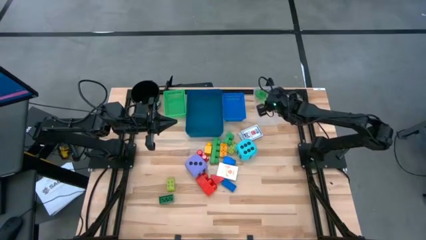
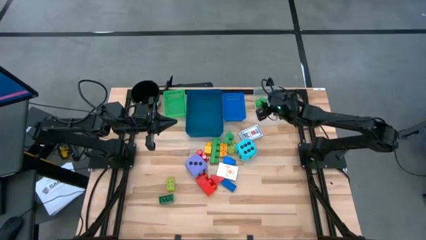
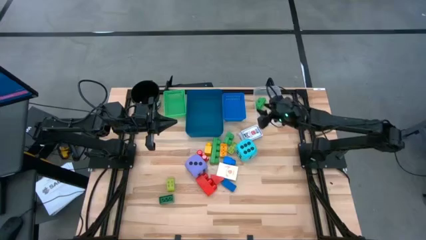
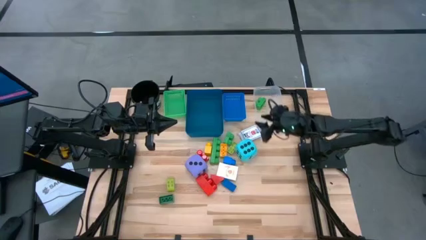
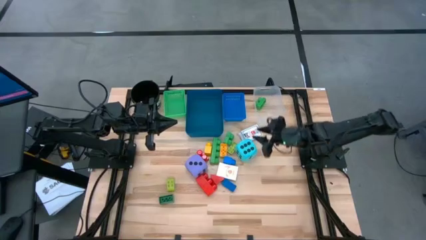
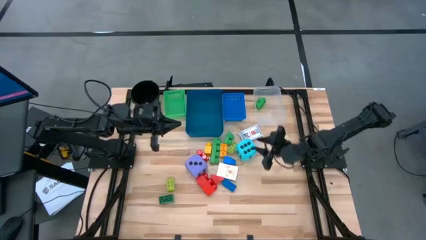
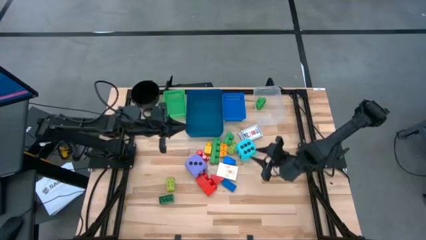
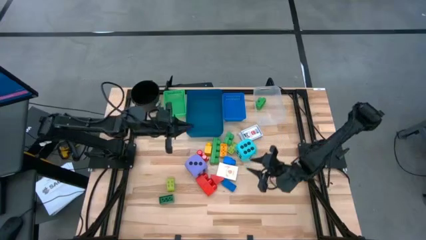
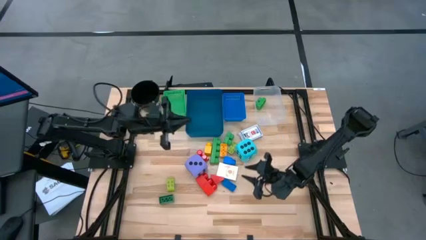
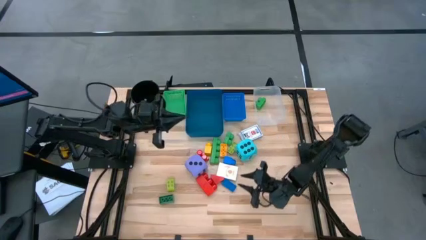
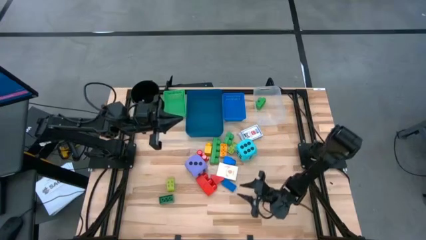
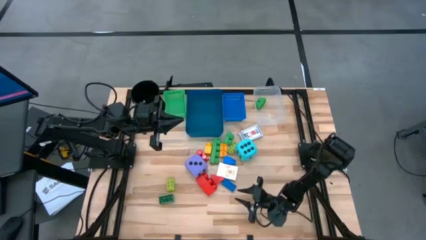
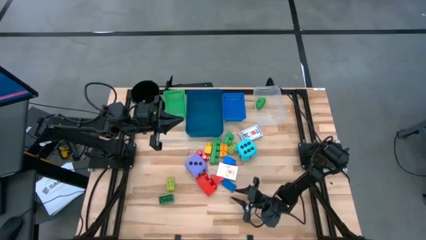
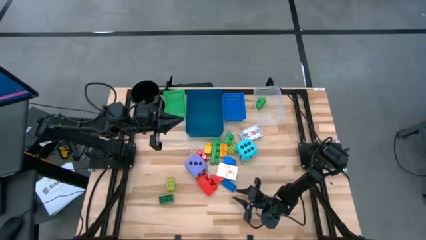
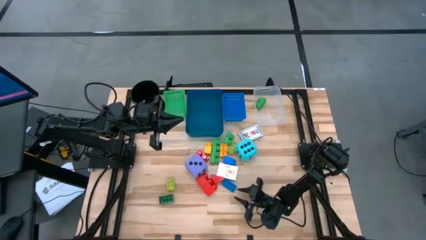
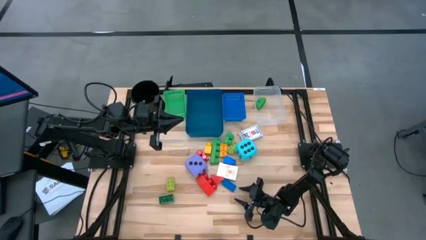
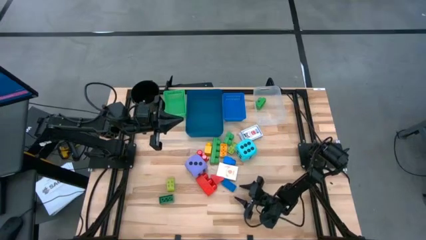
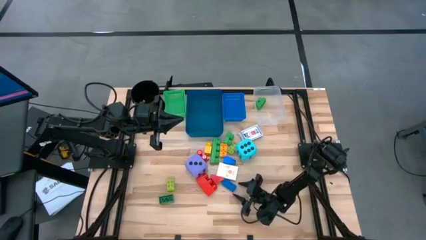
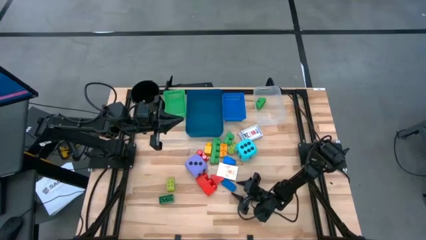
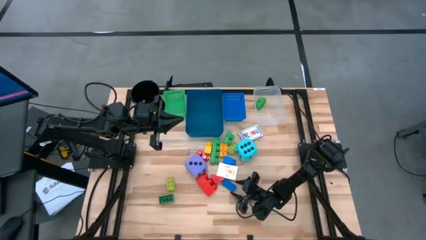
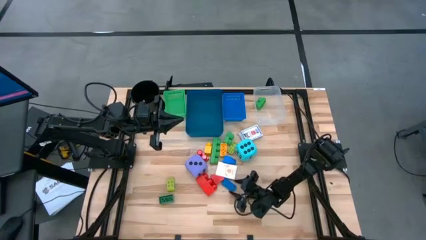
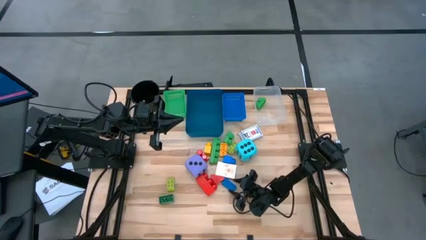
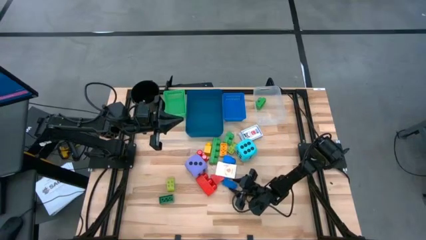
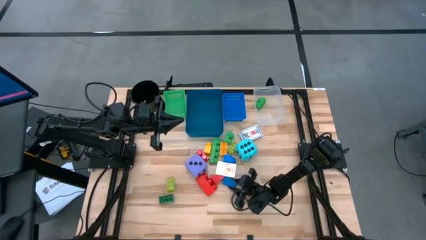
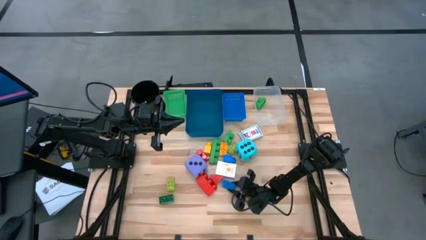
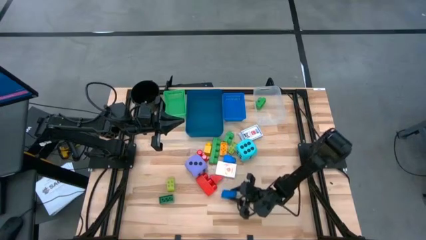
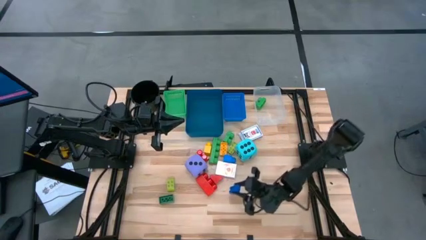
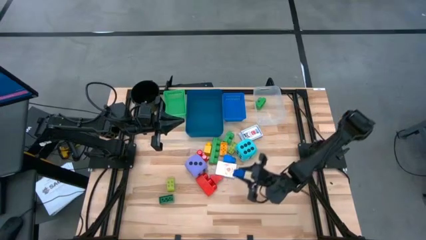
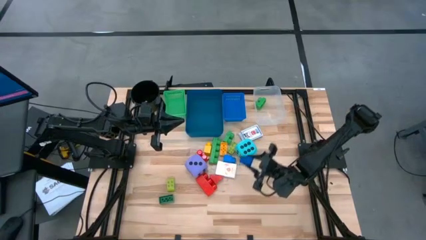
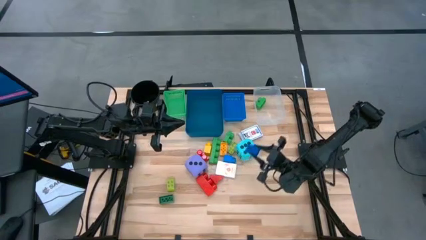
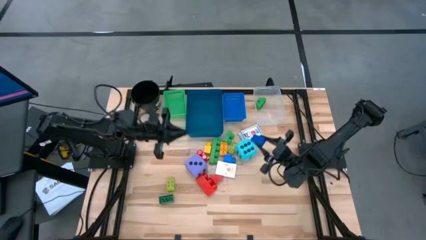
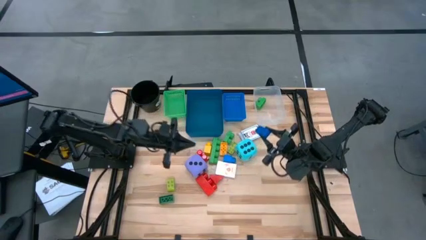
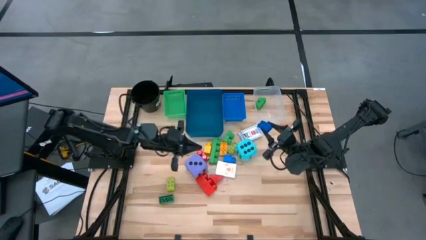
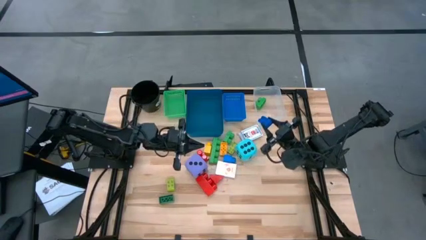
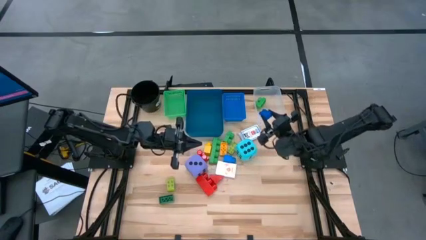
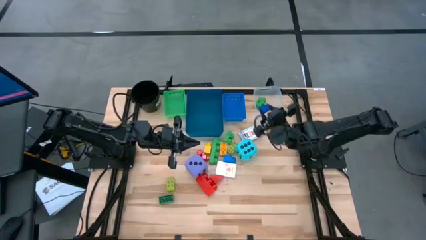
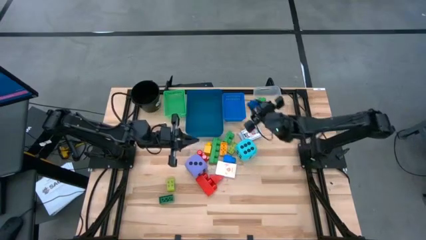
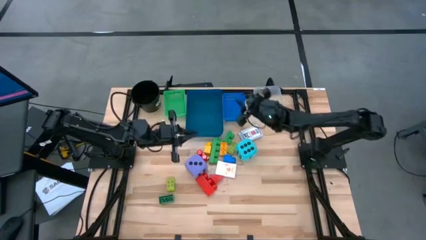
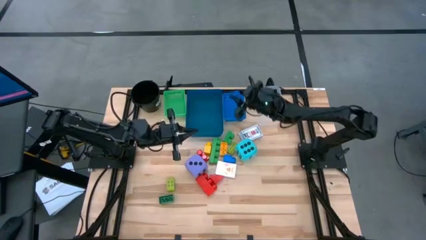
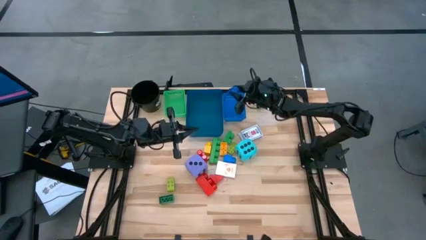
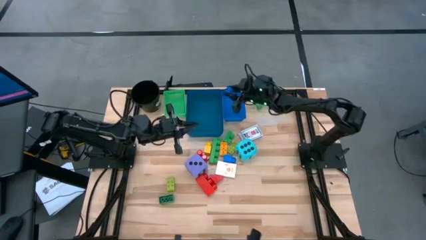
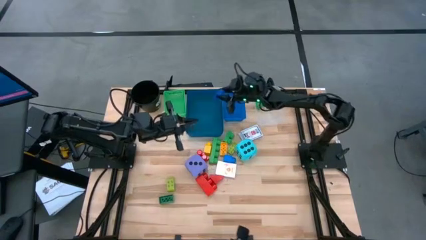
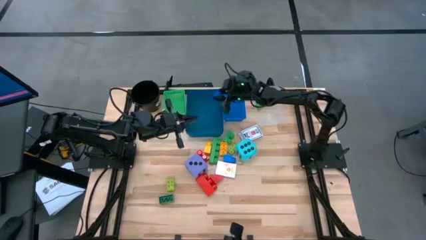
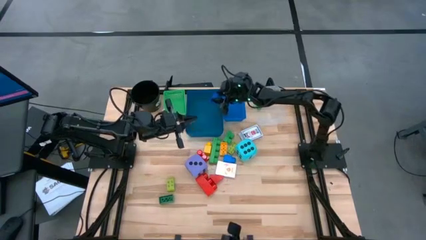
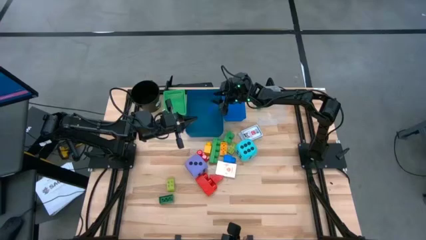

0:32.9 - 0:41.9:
Task: Pick & Place Toys
Put the small blue game piece into the dark blue bin

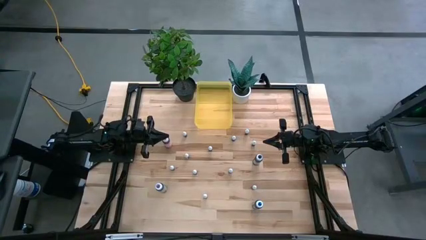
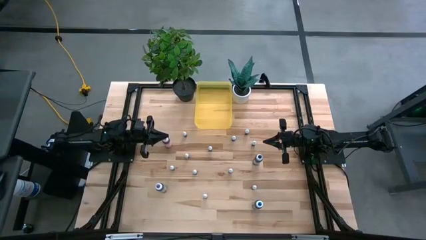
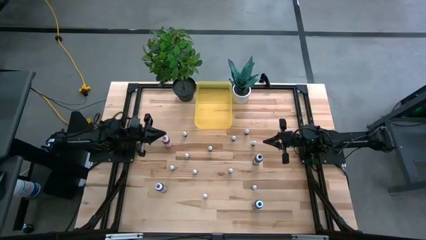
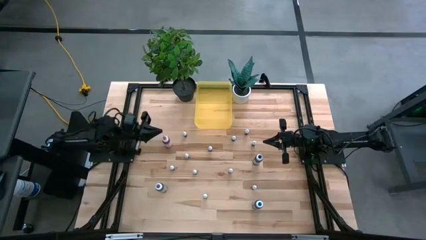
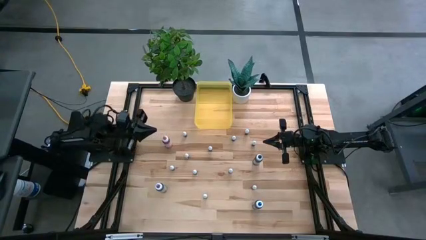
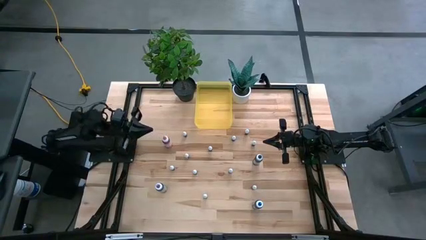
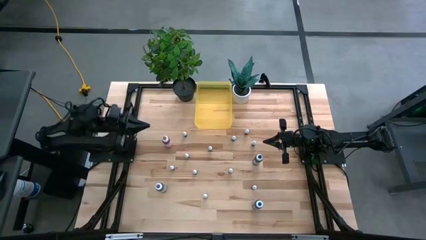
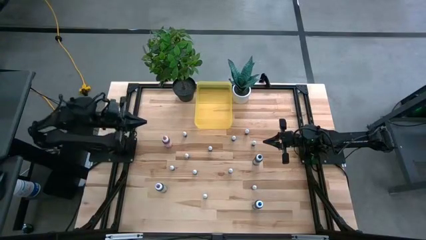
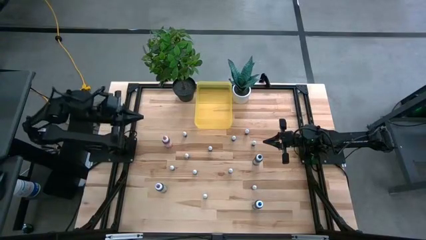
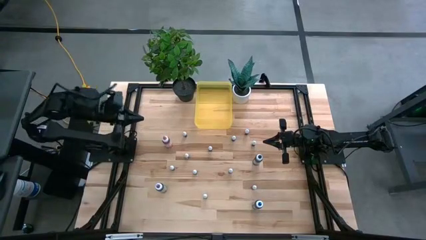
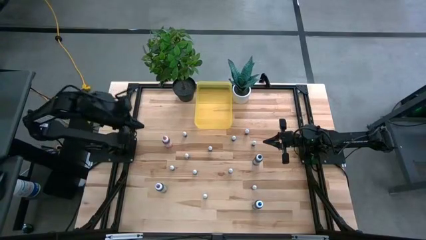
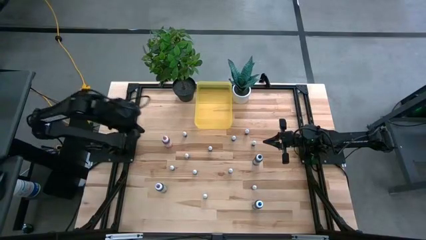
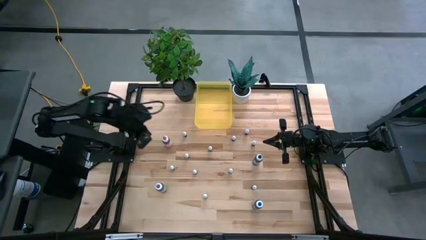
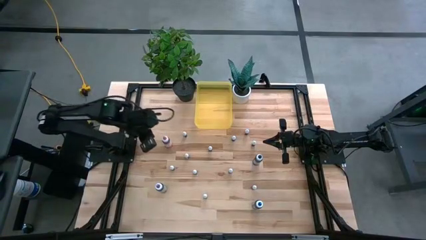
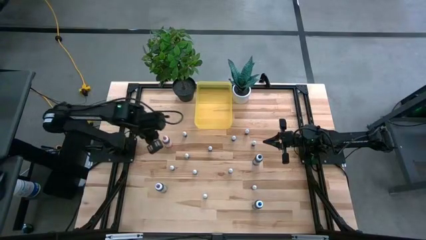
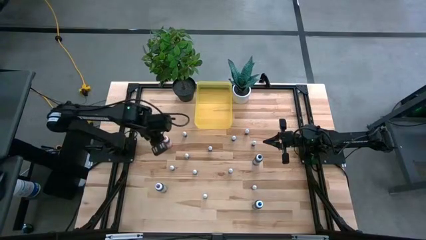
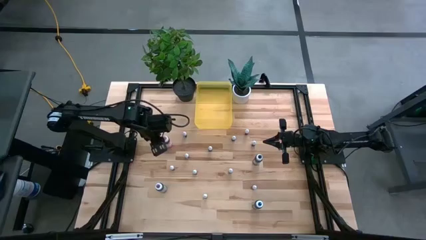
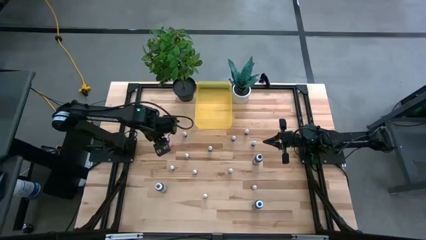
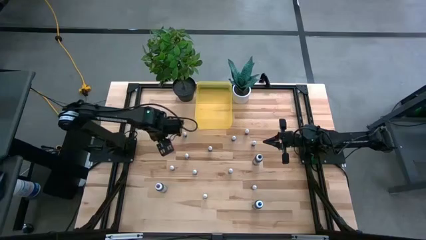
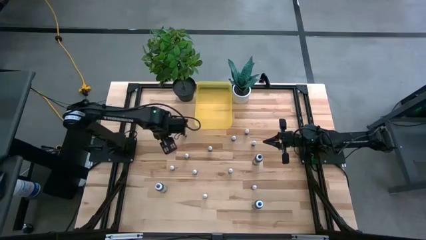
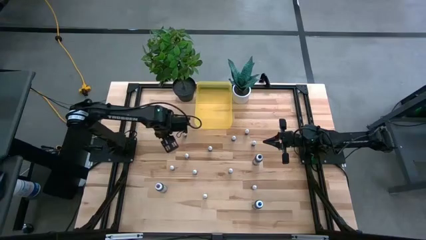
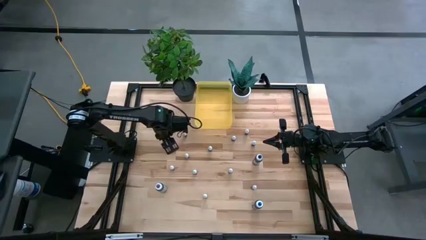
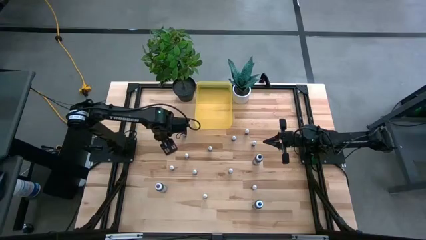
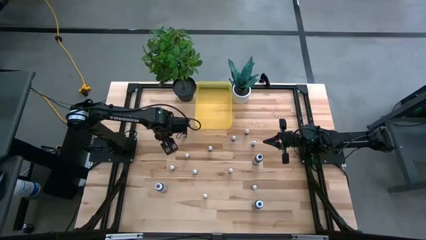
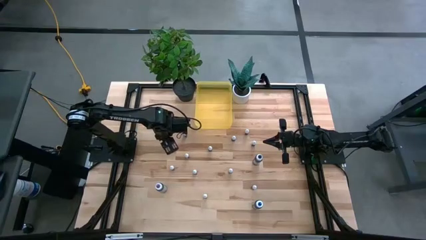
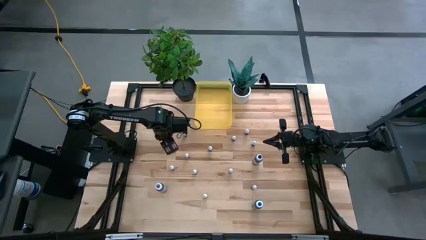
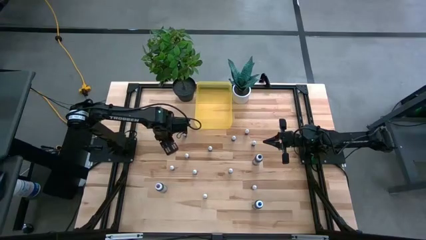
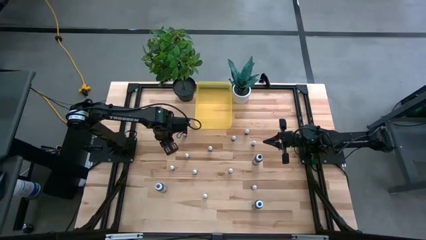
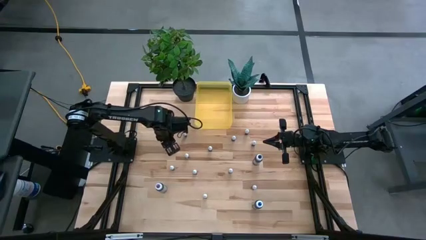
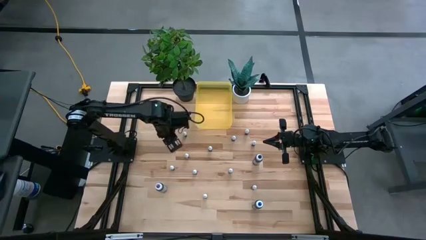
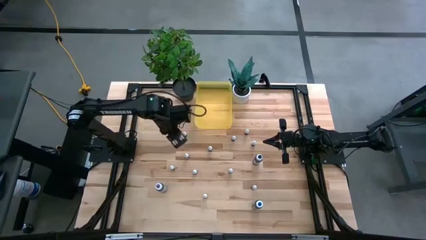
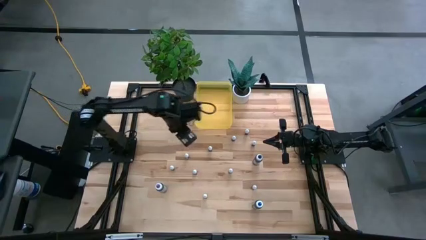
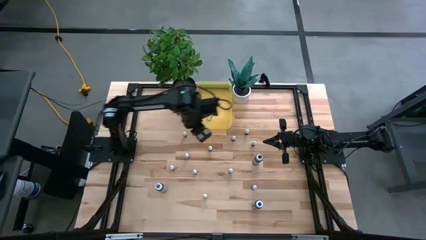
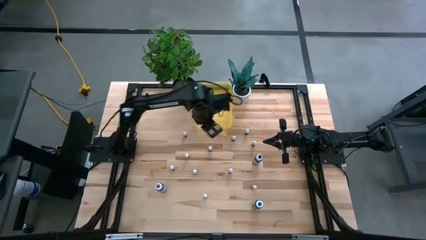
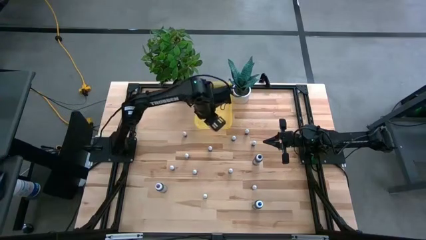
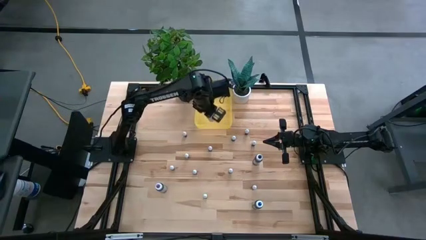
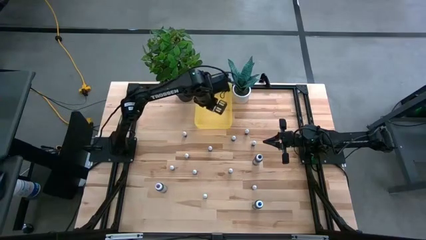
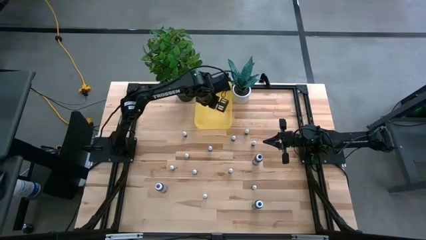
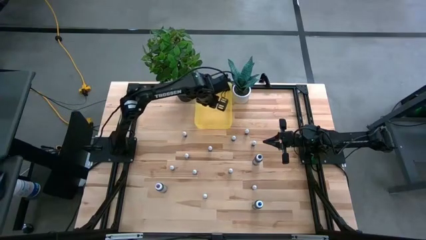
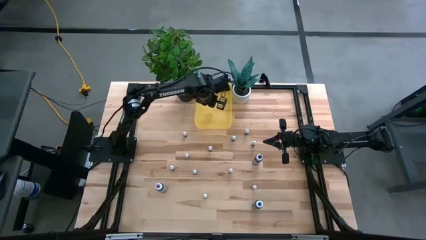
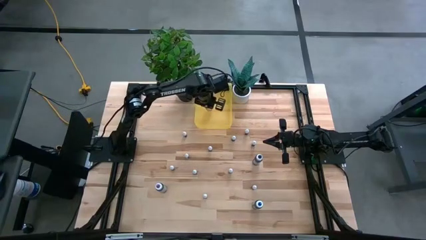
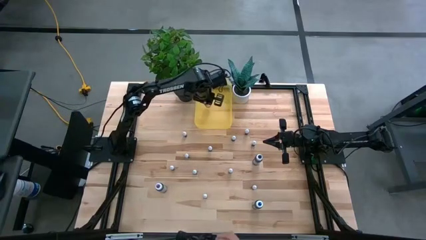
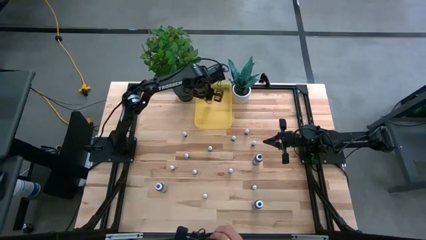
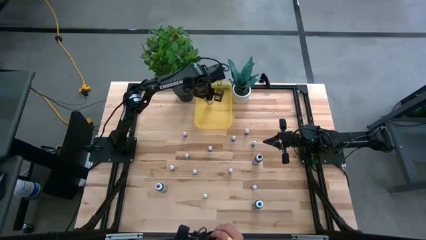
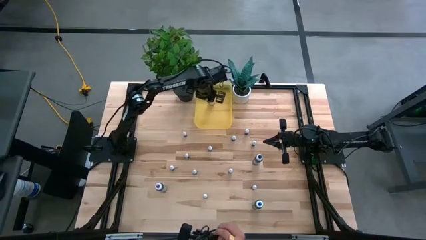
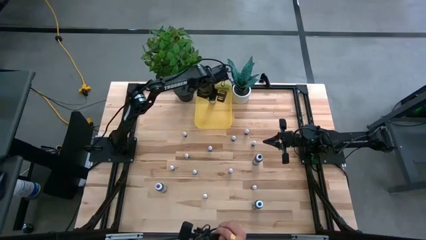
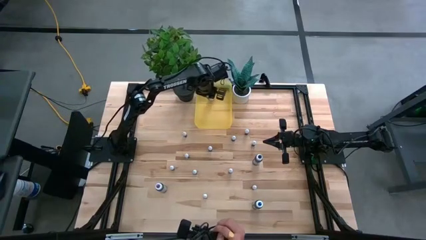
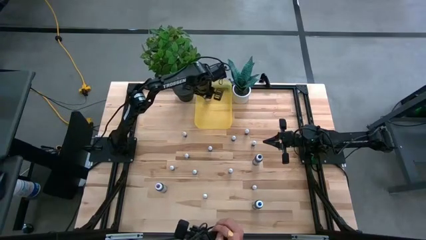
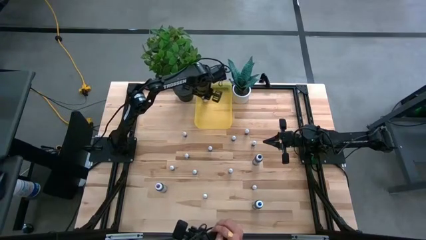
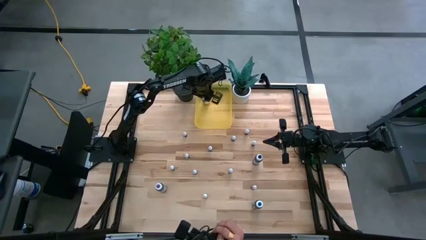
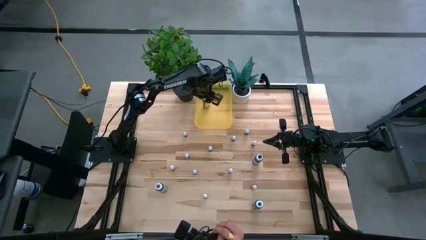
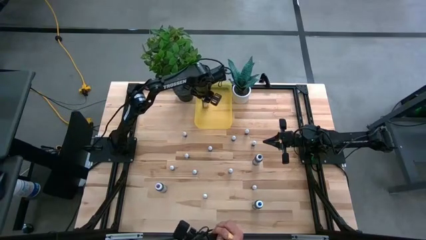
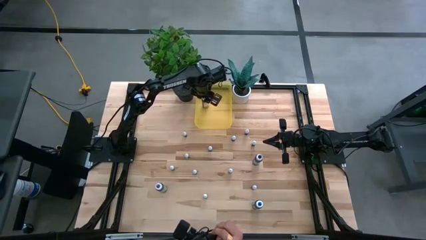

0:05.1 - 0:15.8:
Task: Pick & Place food coloring
Put the large pink food coloring bottle into the yellow bin
